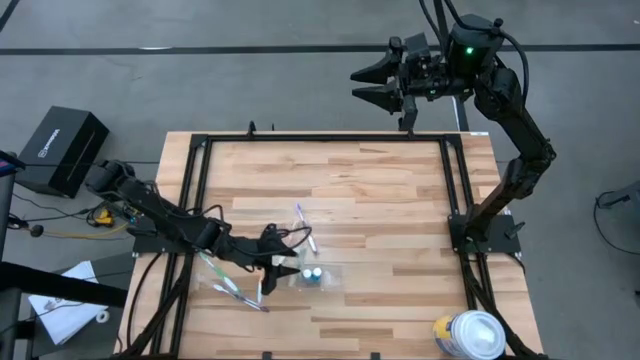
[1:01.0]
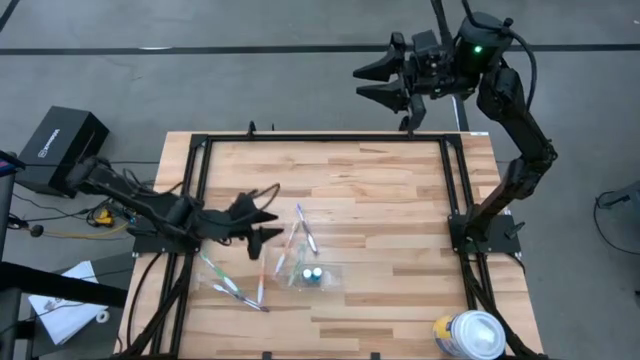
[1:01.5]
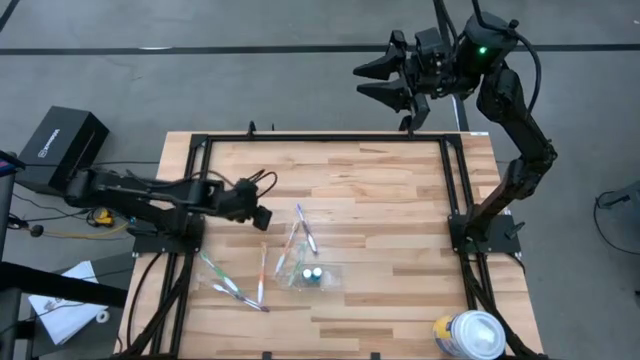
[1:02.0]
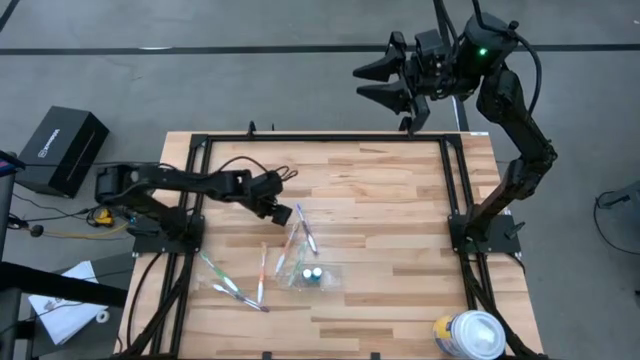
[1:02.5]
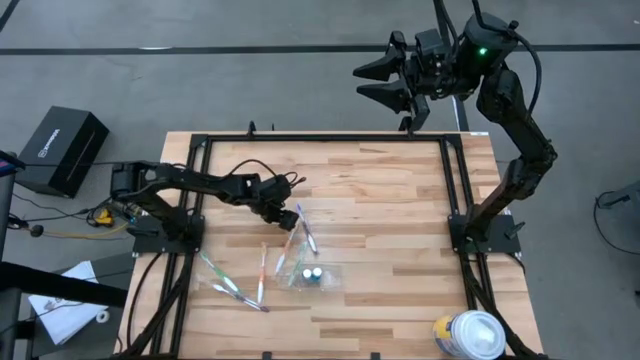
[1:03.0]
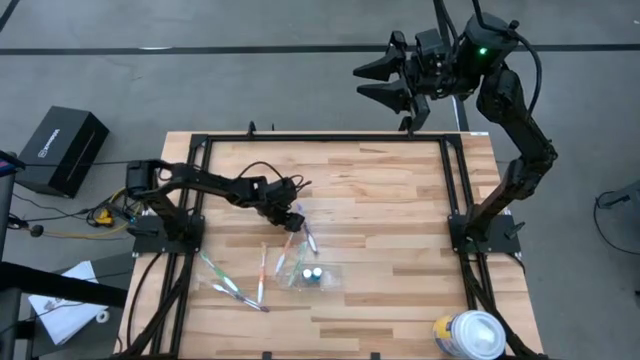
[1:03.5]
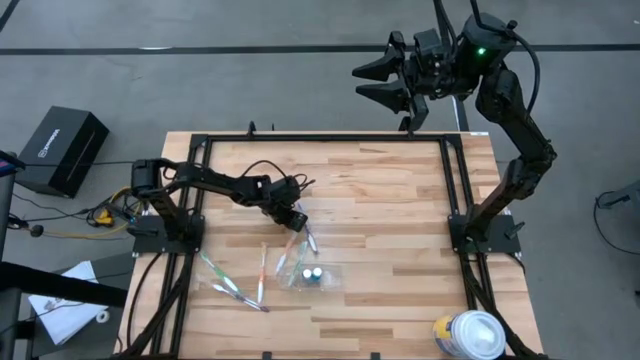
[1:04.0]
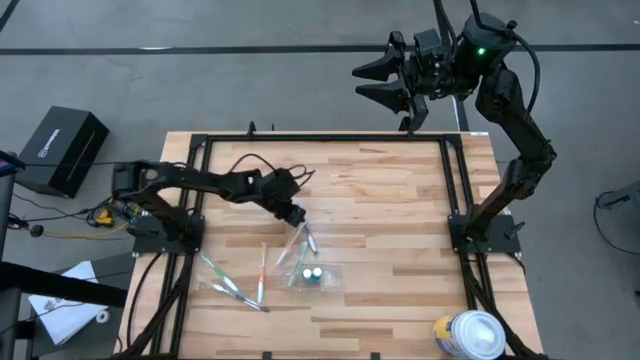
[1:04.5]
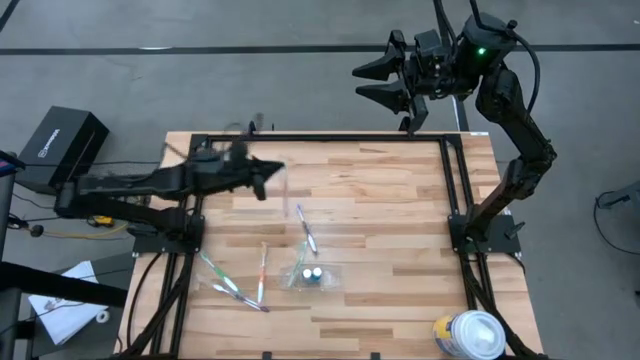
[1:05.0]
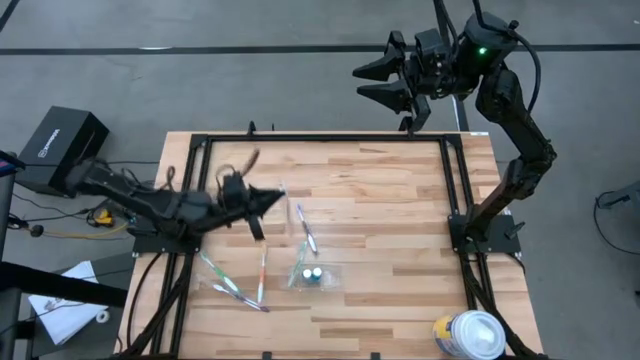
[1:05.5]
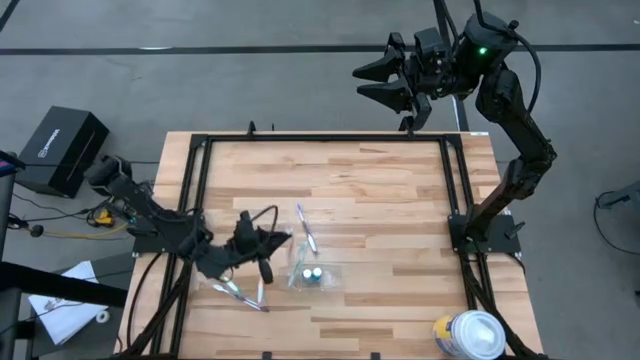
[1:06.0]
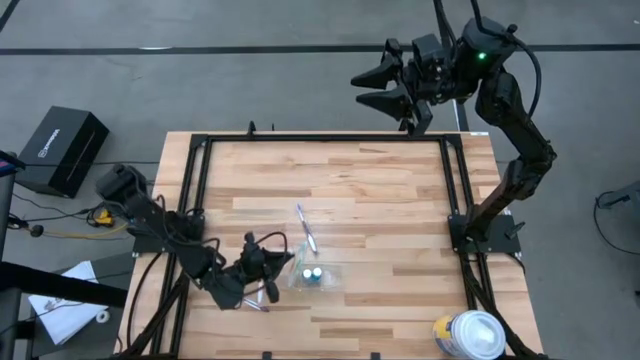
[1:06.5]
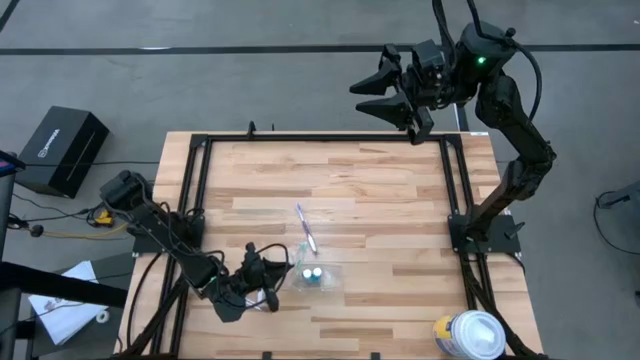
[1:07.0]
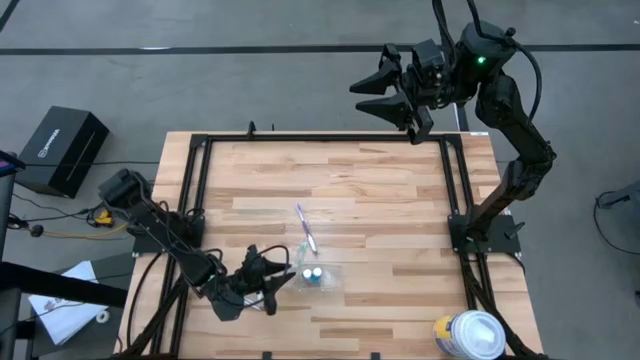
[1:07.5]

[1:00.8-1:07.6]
Task: Pick & Place toothbrushing station
Put the orange toothbrush into the transparent organizer

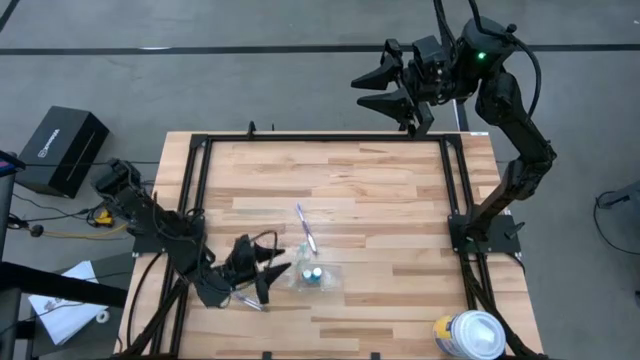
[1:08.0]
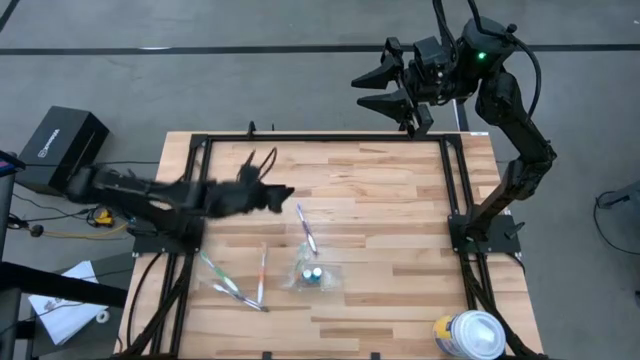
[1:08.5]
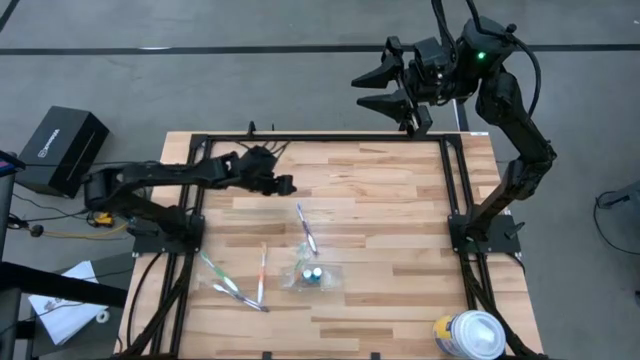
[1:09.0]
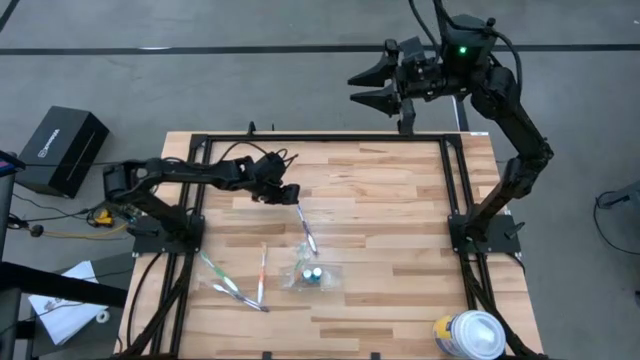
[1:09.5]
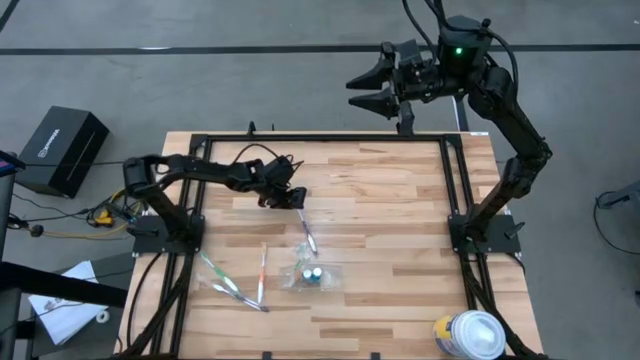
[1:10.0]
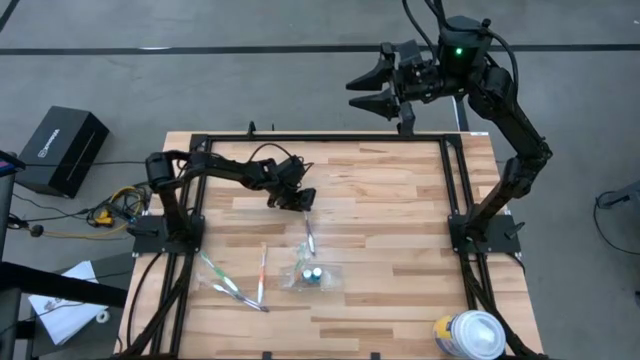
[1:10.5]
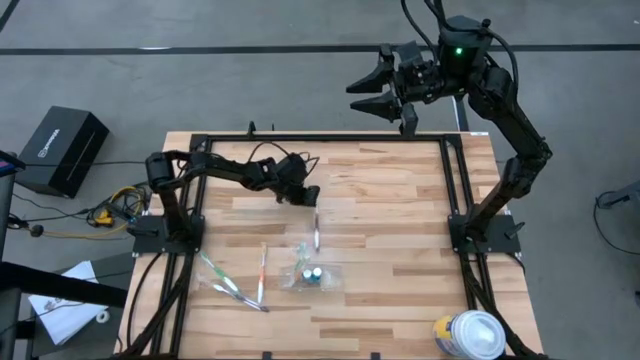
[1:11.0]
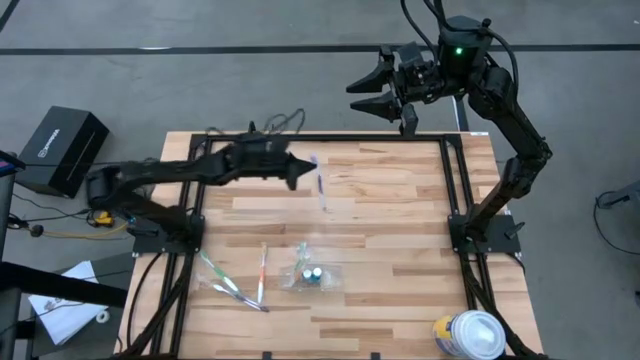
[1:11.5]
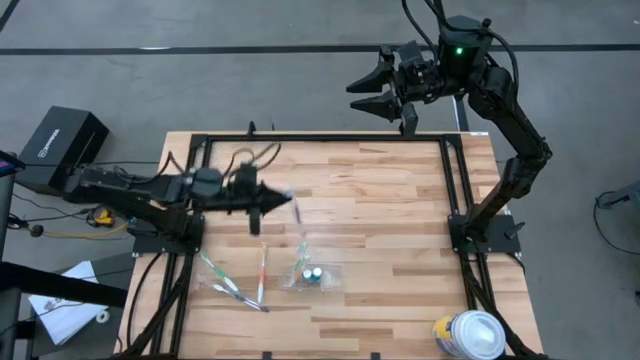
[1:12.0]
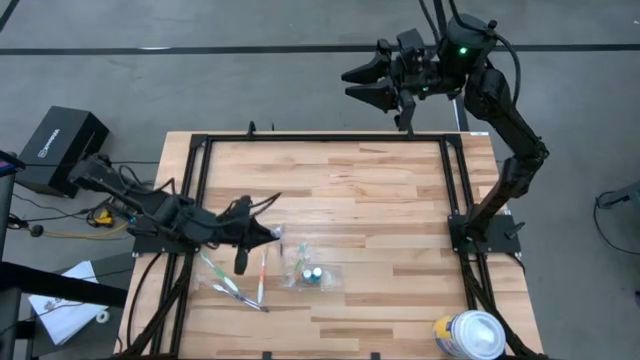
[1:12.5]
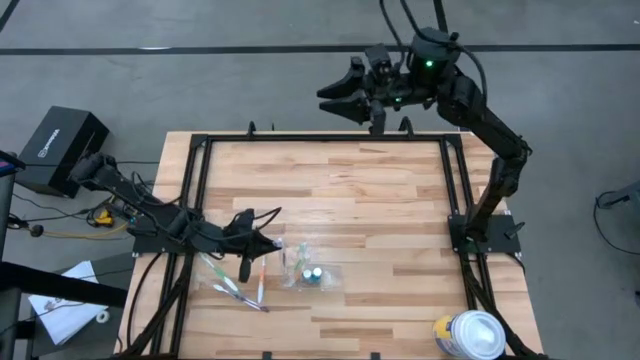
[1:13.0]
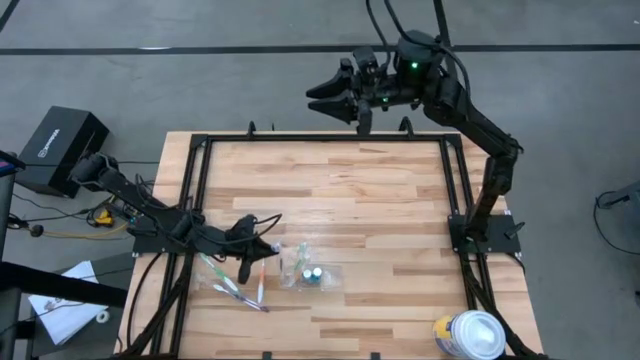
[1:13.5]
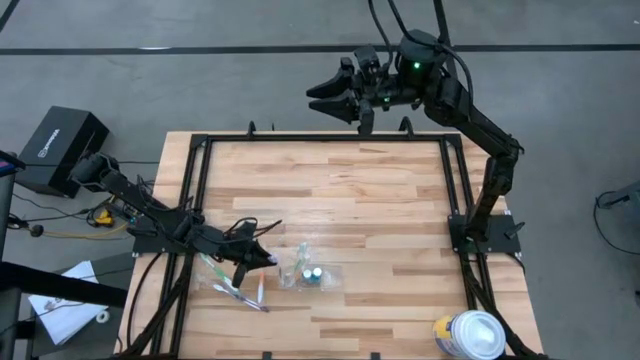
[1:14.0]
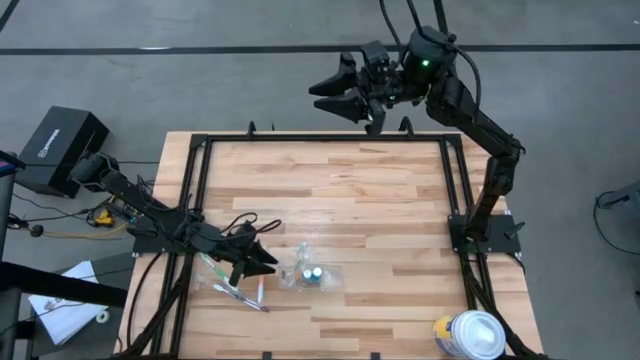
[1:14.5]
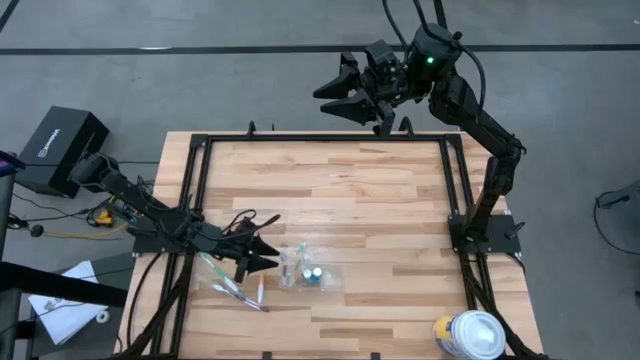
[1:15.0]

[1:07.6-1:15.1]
Put the violet toothbrush into the transparent organizer

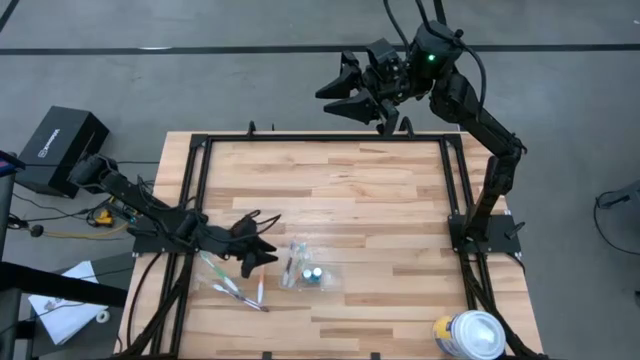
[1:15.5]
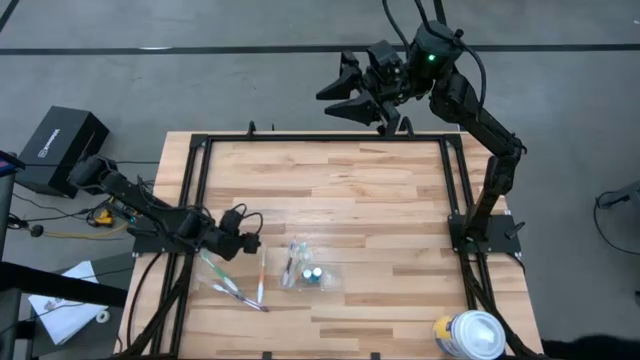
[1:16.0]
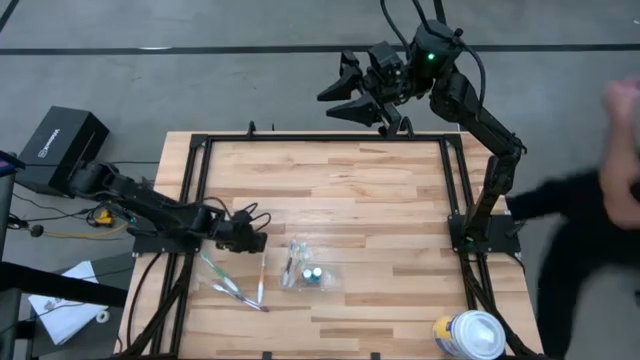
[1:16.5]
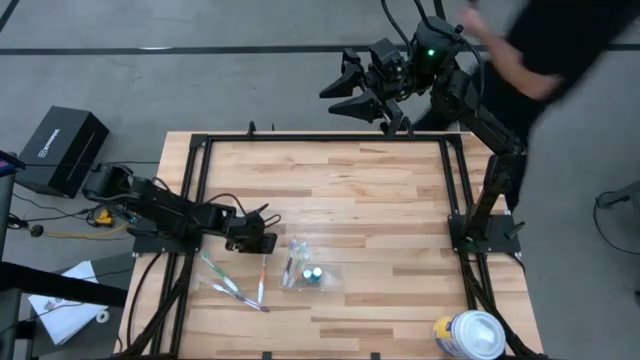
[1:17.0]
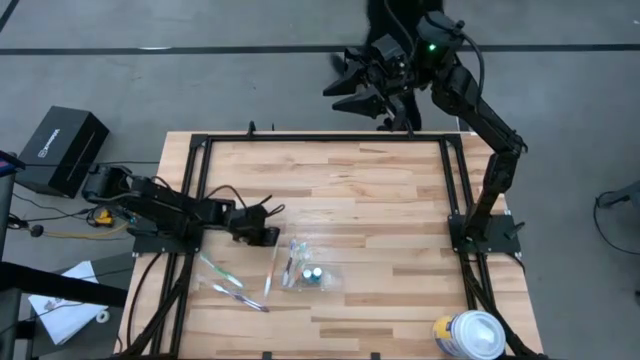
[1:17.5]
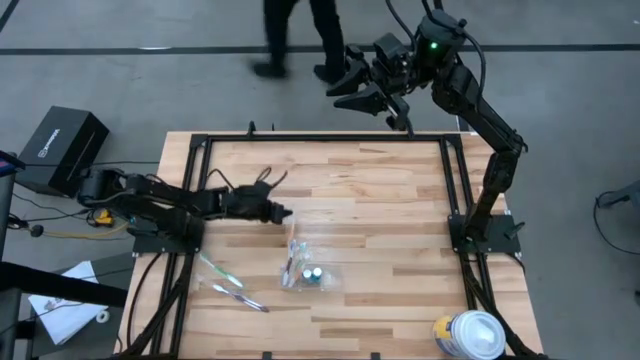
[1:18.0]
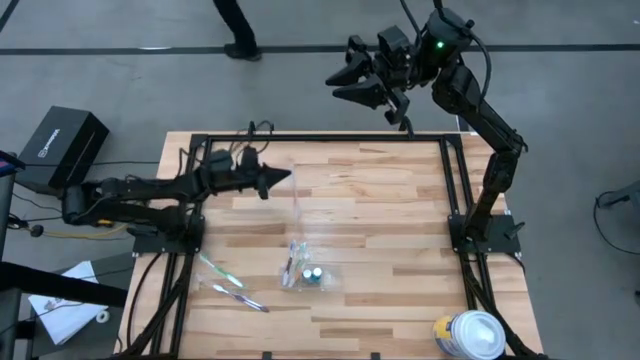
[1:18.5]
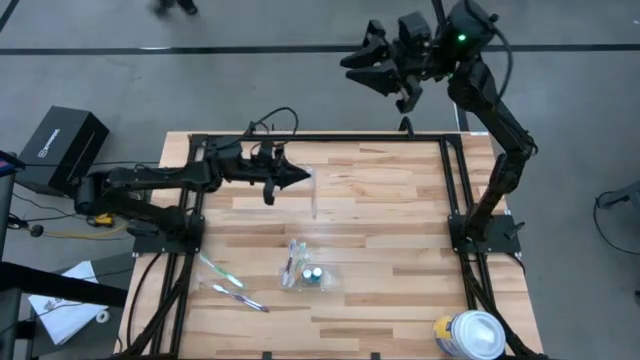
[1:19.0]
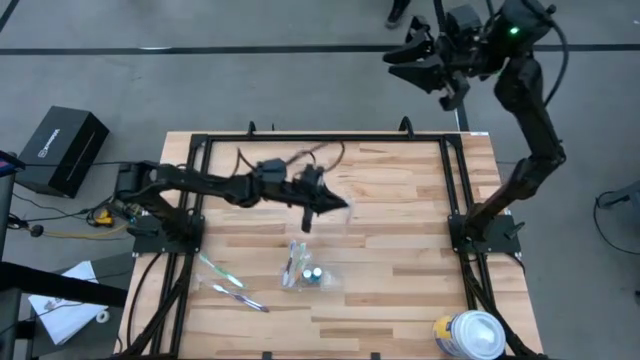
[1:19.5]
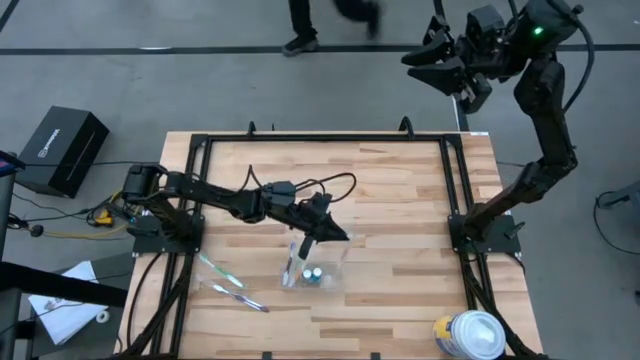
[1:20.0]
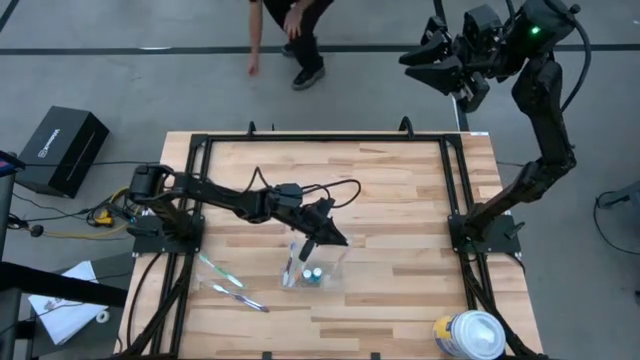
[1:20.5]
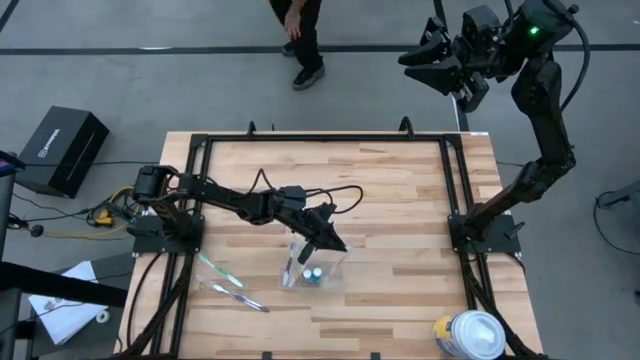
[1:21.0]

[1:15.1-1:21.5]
Put the orange toothbrush into the transparent organizer

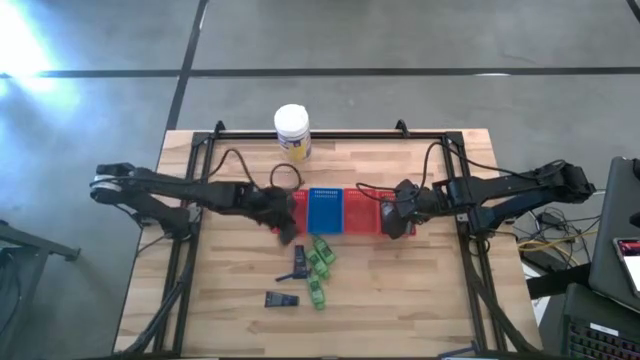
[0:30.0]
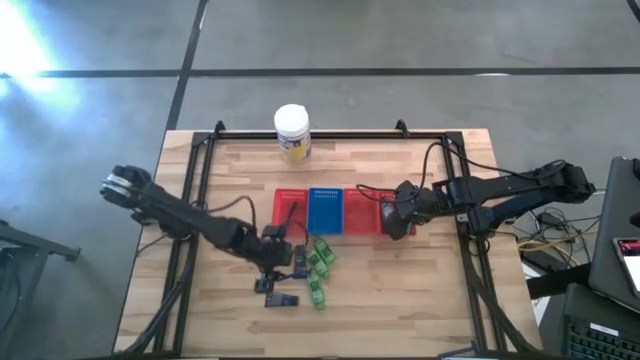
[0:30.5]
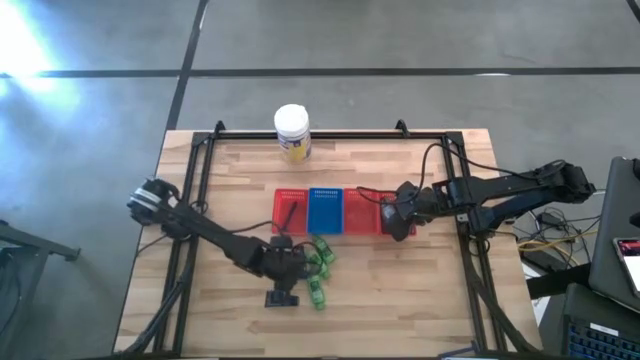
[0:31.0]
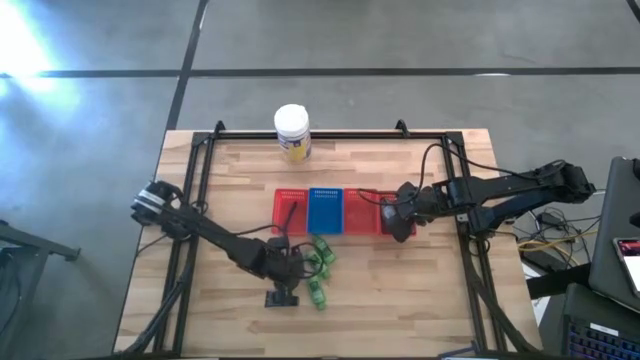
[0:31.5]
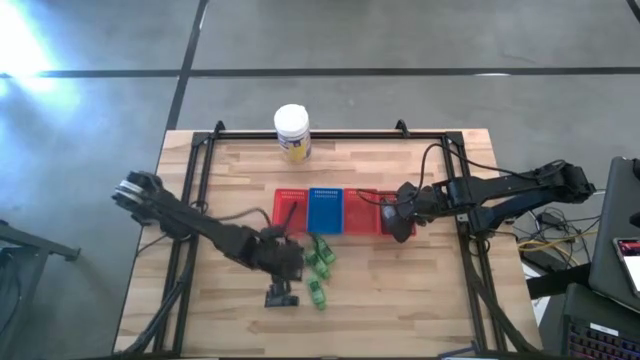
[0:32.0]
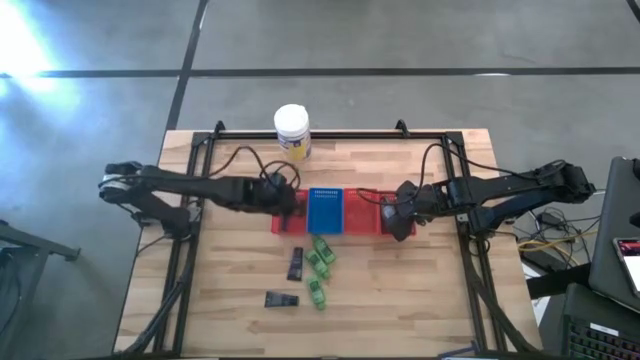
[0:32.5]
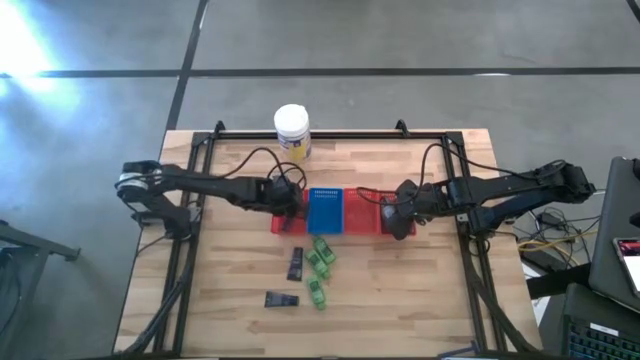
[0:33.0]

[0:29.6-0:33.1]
Task: Pick & Place Travel size toiletries
Put the razor into the left red bin
